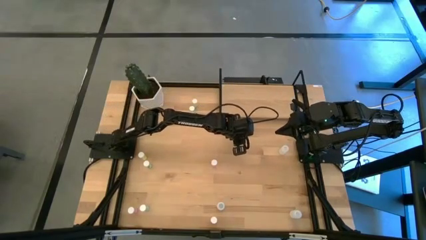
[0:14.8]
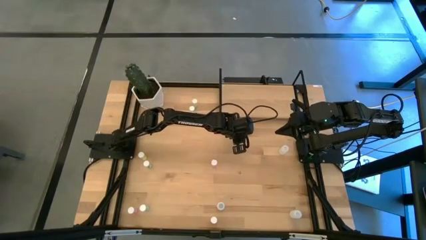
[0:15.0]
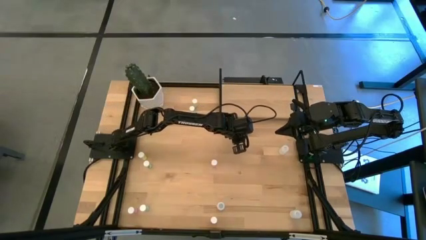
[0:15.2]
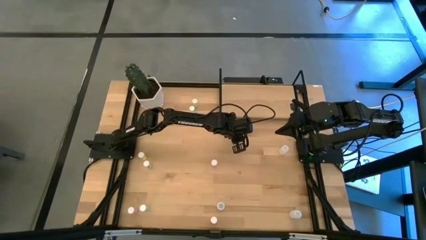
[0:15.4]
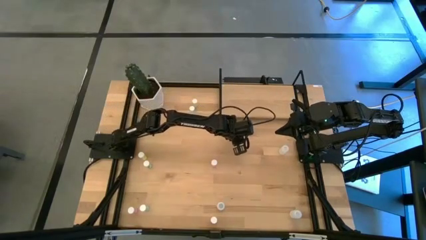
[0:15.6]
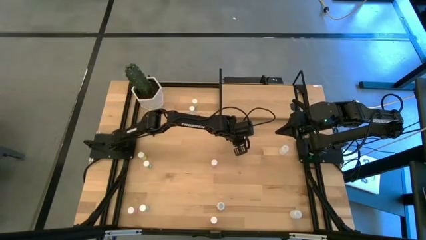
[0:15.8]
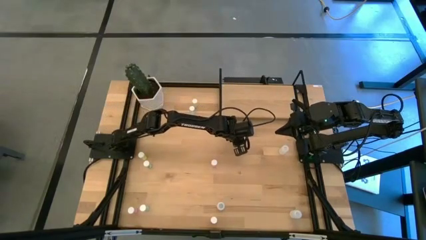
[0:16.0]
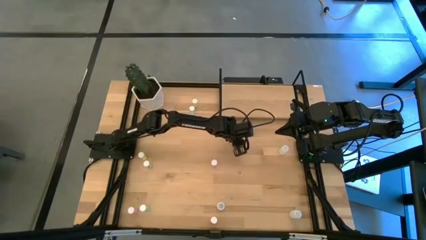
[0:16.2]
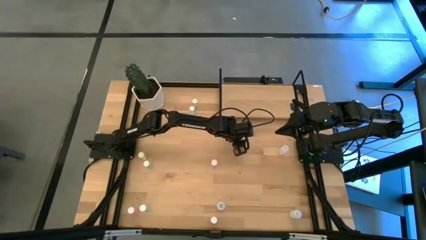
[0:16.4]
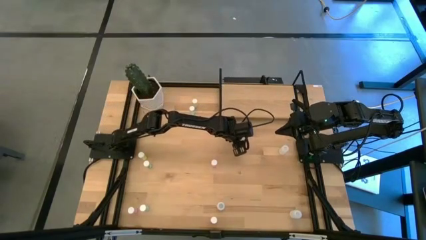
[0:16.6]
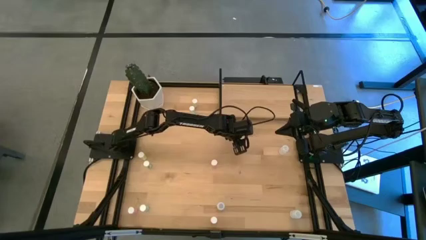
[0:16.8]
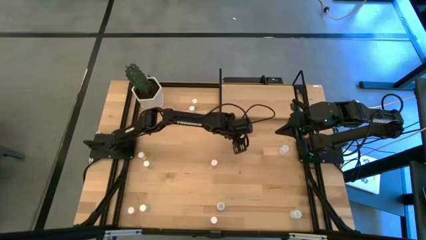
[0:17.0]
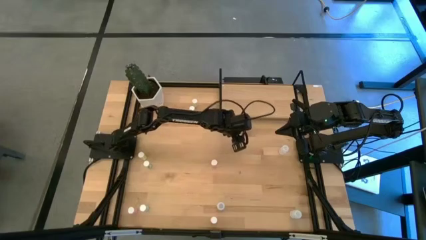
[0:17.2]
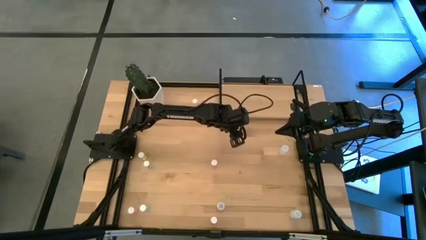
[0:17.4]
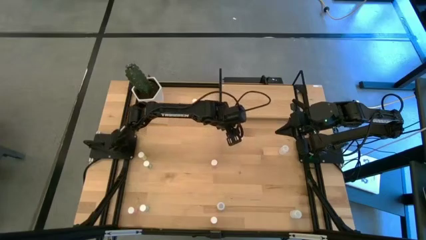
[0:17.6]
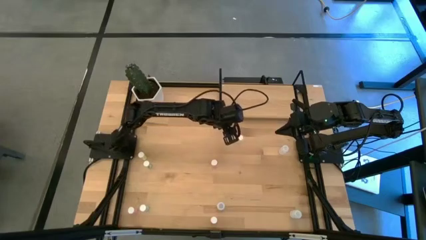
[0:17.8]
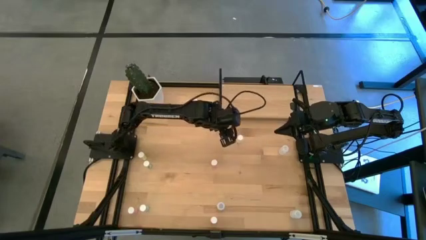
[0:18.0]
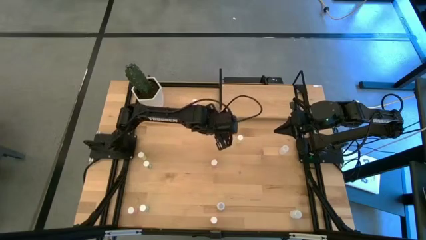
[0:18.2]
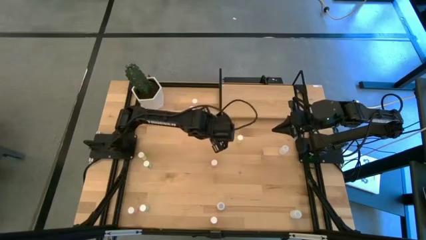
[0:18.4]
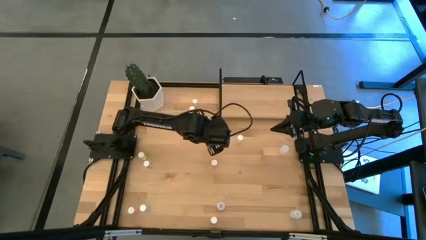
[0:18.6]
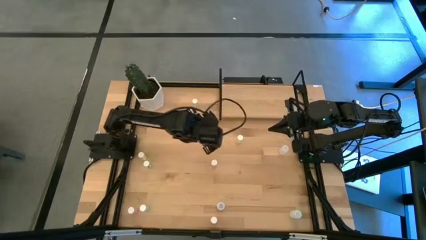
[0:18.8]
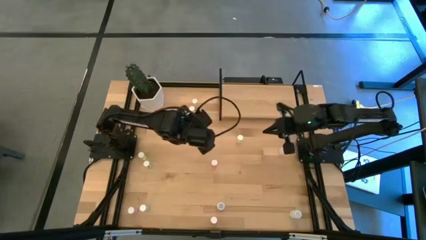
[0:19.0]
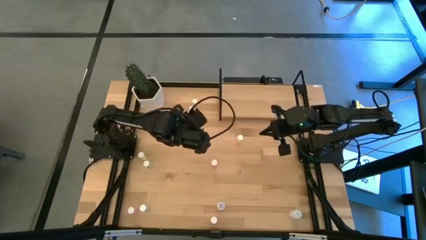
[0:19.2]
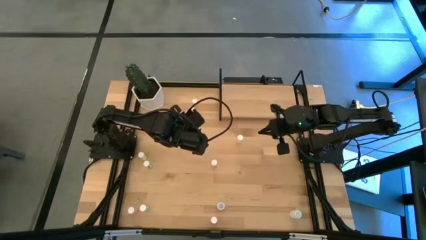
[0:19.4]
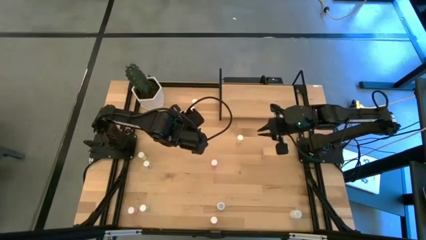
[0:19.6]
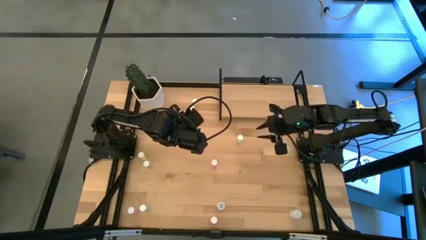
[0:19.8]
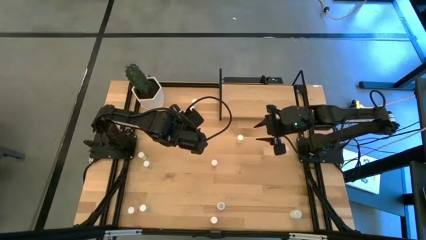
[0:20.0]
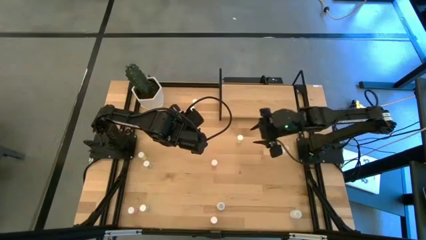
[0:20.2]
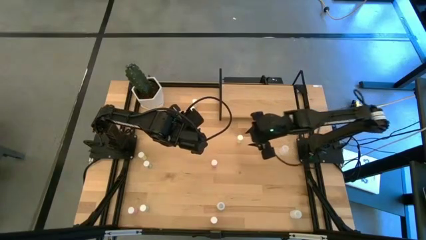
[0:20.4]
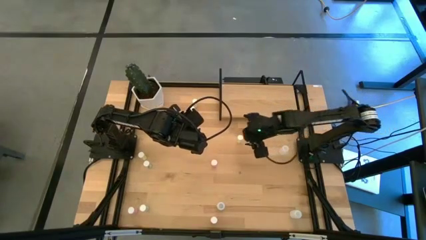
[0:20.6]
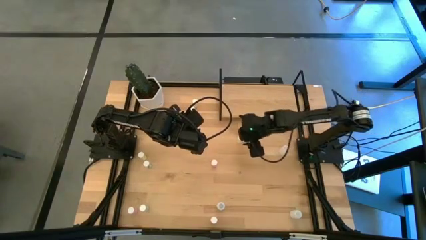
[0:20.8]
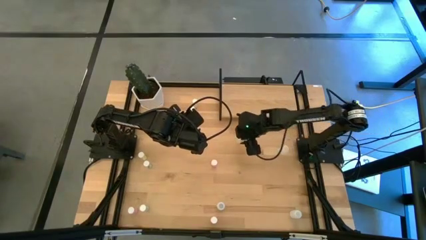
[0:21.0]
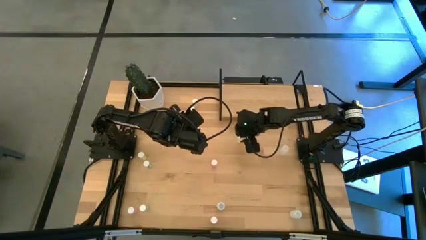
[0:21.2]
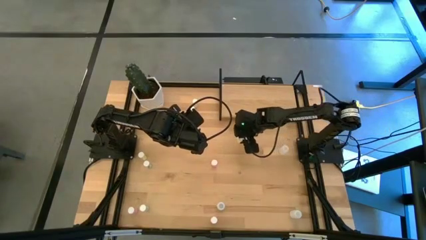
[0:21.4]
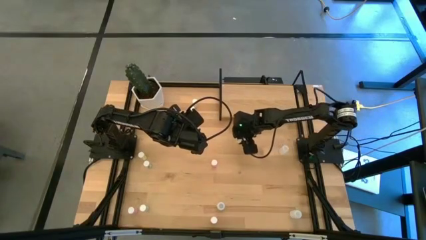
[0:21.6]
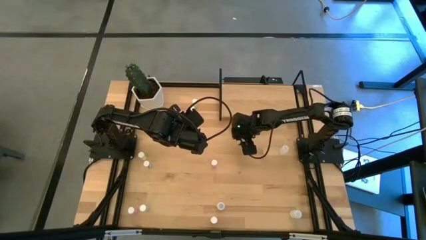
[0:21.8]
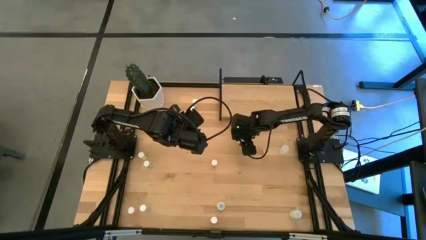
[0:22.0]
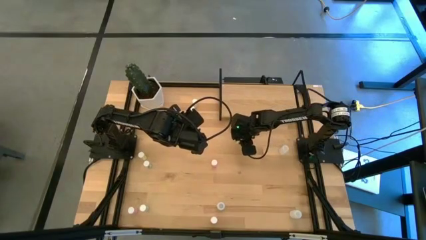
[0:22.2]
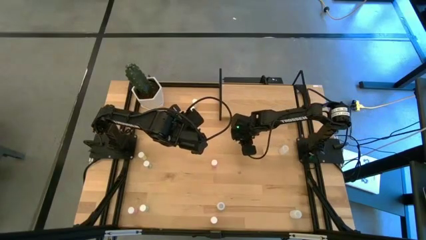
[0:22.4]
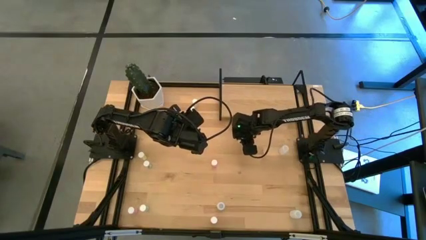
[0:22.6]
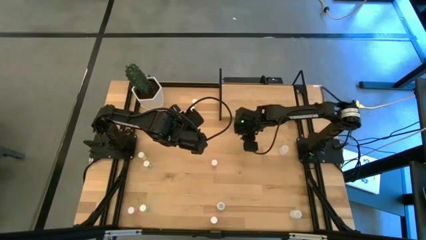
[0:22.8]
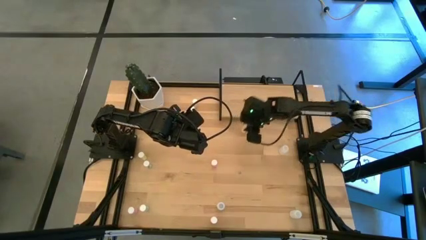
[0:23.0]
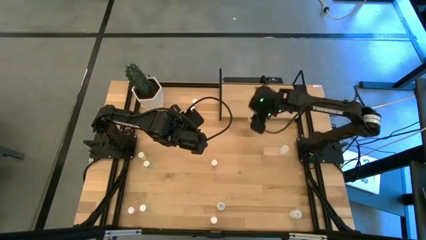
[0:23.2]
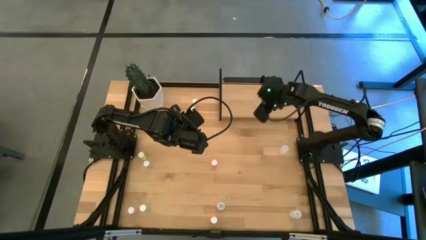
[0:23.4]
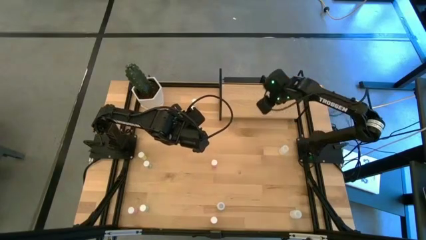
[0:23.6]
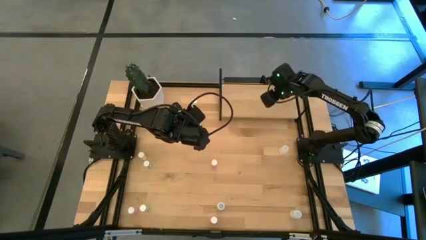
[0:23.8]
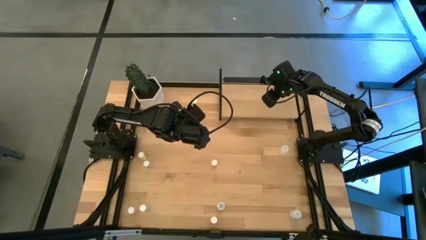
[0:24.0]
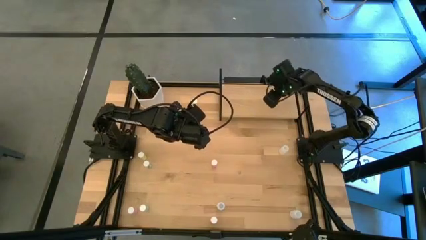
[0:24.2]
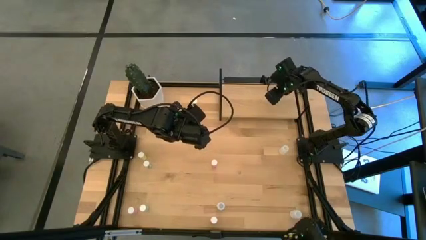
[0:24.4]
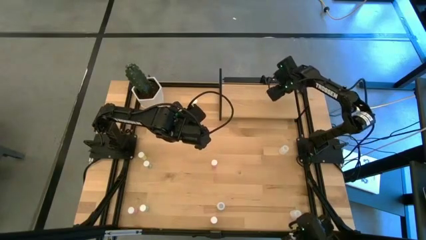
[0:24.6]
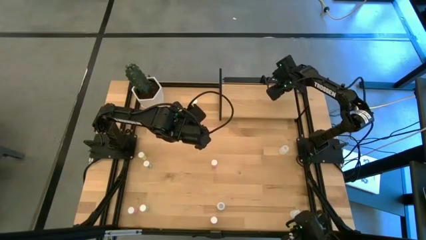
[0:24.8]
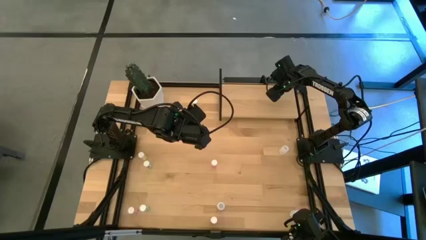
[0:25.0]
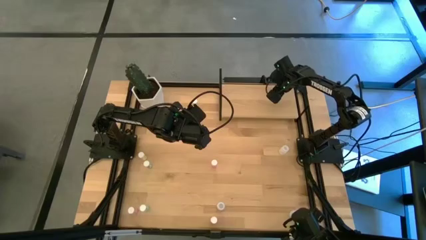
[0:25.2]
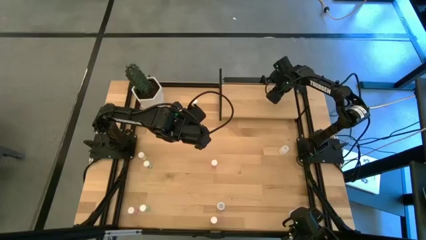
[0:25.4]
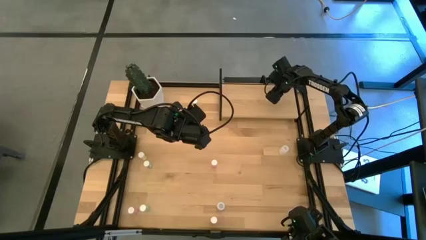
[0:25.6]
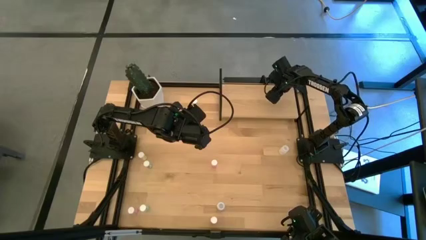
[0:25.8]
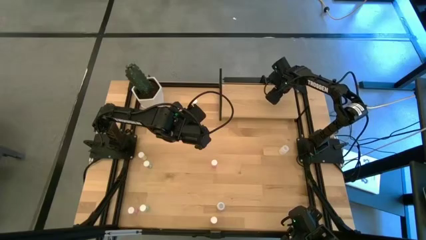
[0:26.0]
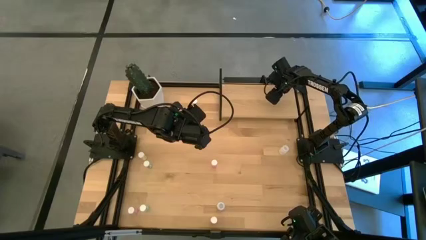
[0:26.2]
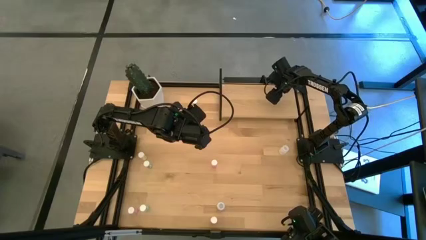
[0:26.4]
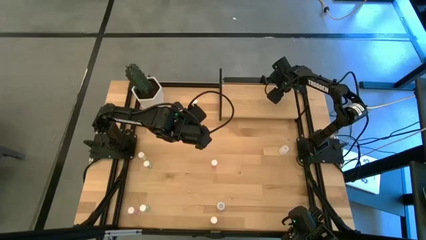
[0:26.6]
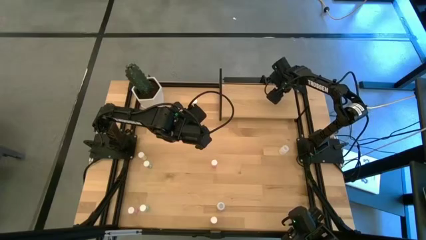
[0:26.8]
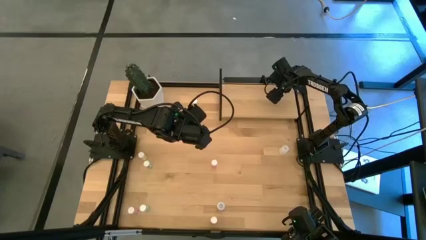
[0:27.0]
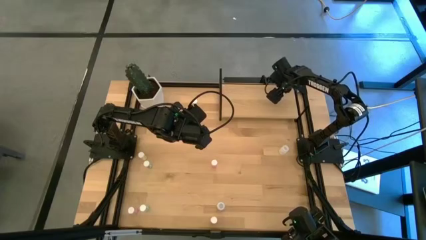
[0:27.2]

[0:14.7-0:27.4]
Task: Pick and place medicine bottles onto shelf by color
Put the bottom right yellow pill bottle on the shelf

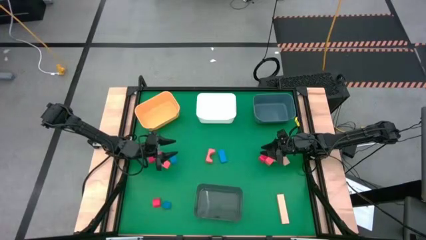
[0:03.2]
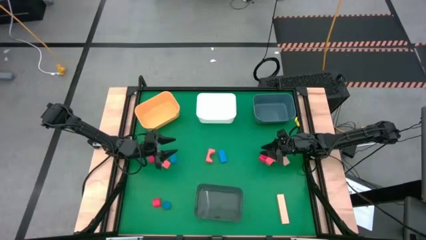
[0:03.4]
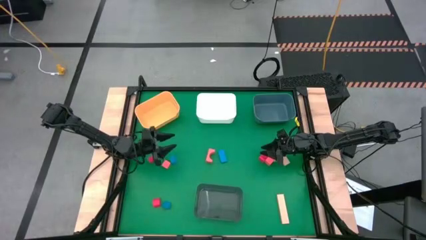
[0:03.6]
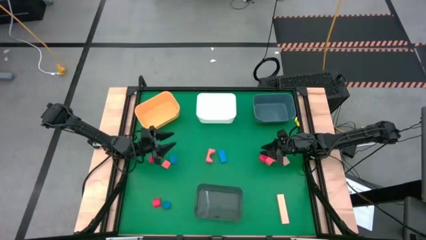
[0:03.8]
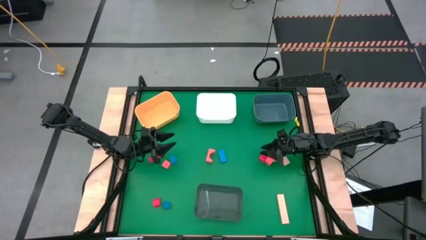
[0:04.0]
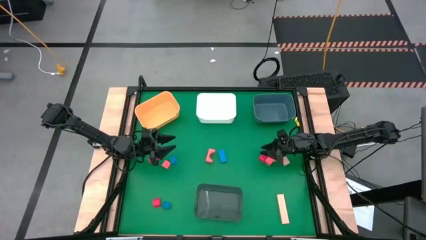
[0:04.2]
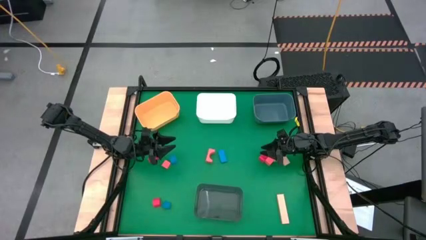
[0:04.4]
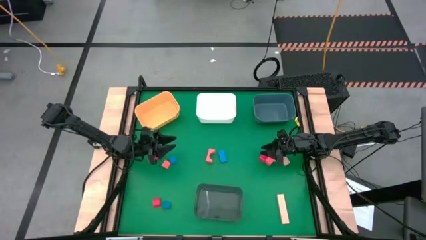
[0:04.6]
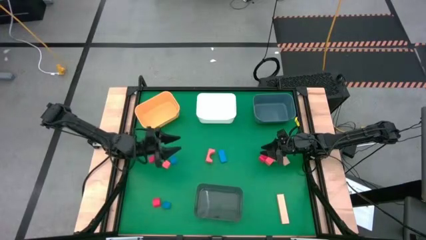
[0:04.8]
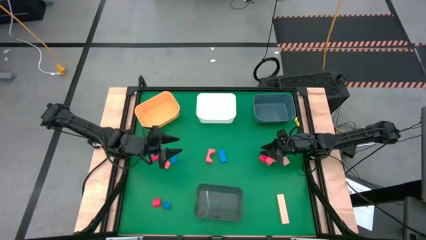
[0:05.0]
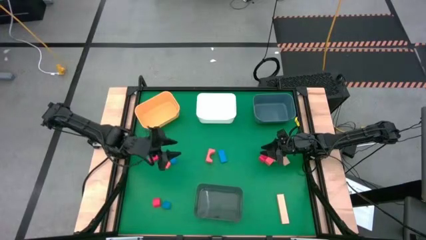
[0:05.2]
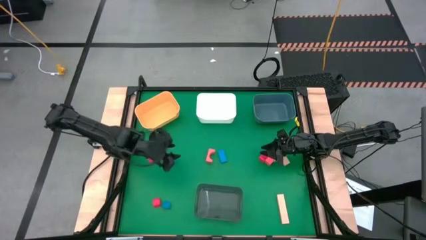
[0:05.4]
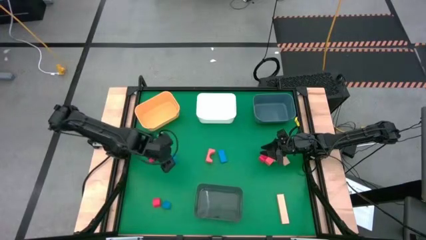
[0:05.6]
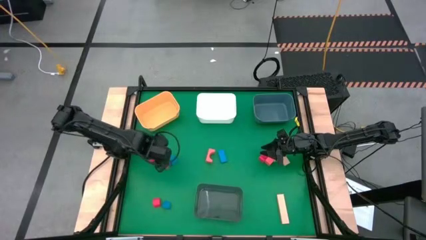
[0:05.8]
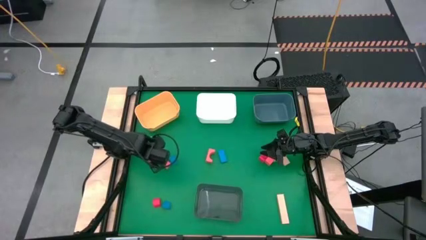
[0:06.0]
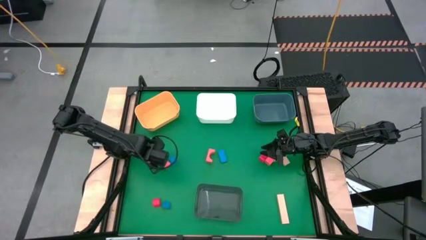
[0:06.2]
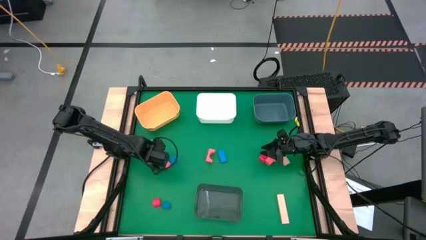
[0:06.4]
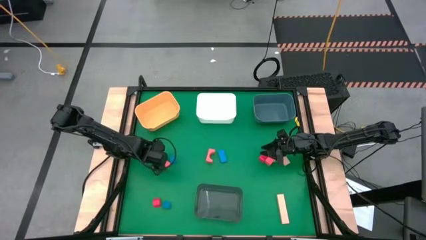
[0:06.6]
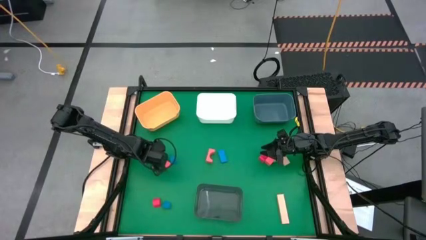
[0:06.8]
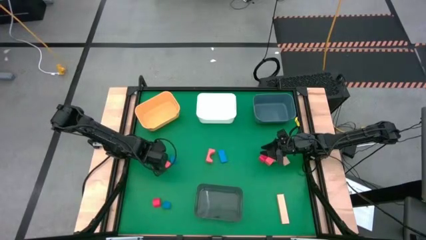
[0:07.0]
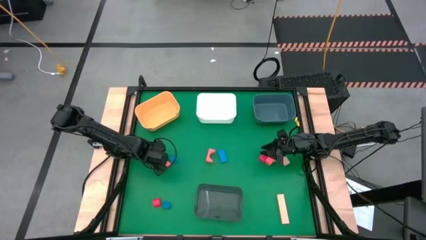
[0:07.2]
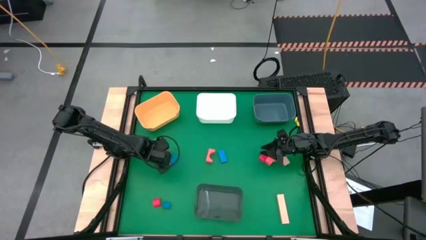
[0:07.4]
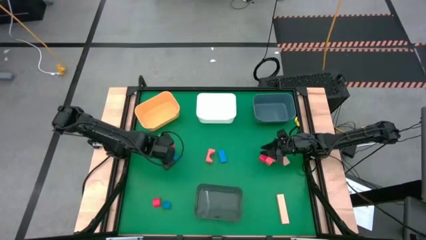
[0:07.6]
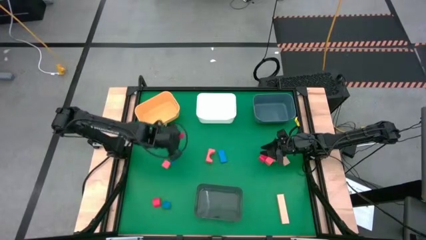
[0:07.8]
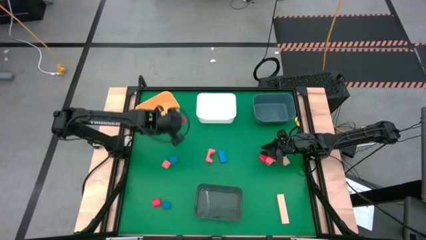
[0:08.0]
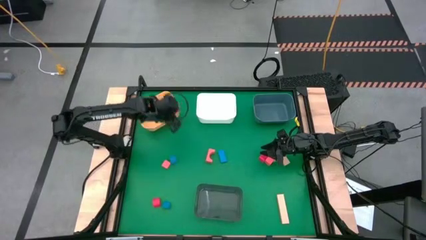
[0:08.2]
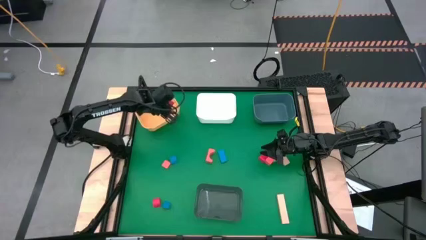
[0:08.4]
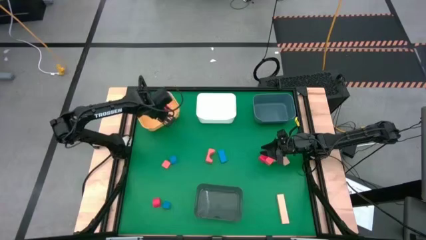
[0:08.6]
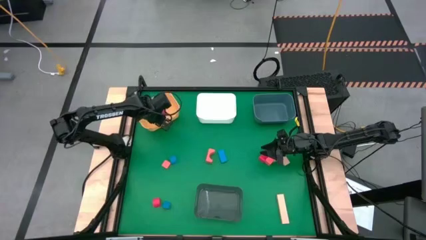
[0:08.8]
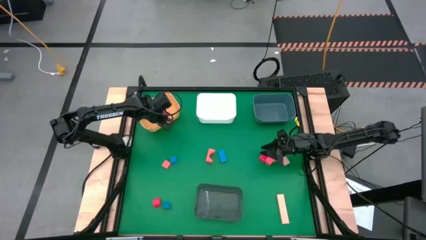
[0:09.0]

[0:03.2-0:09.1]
Task: Sort & place blocks by color
Put the red block into the yellow bin
